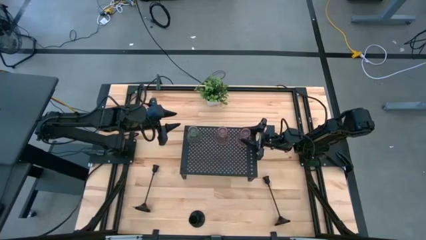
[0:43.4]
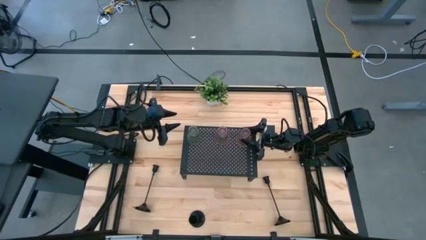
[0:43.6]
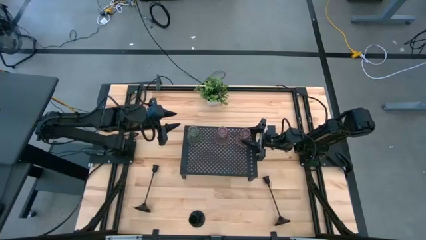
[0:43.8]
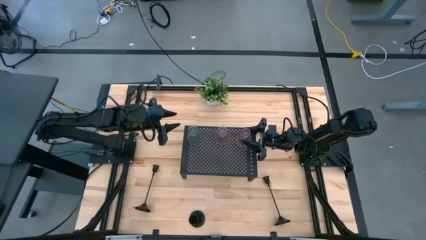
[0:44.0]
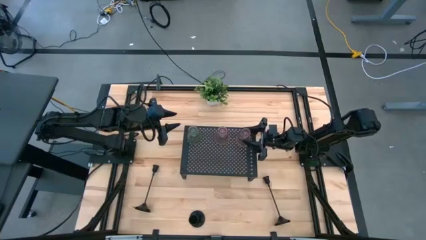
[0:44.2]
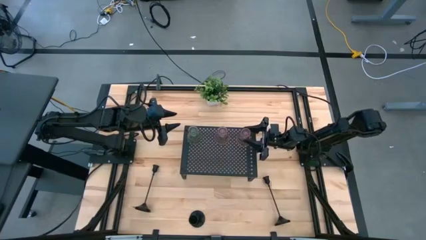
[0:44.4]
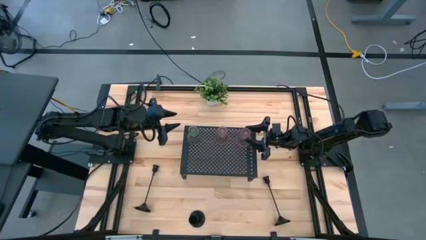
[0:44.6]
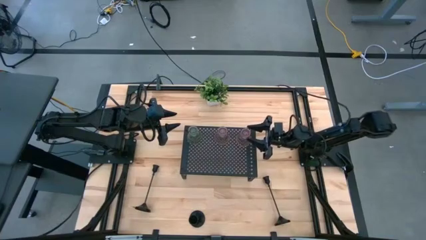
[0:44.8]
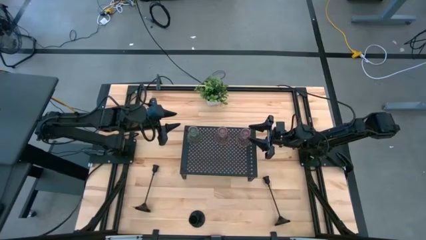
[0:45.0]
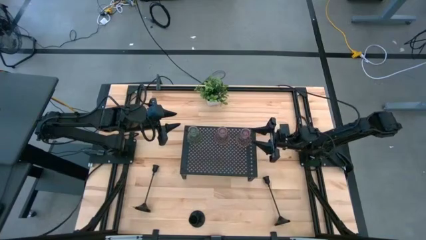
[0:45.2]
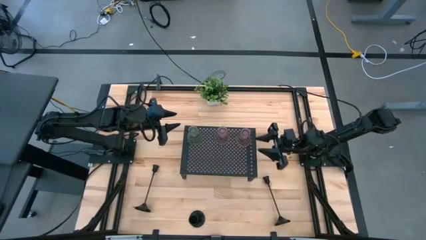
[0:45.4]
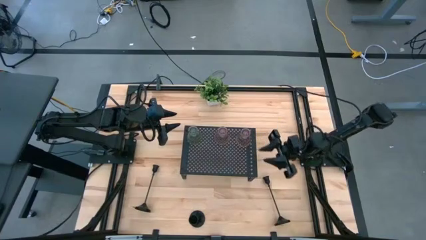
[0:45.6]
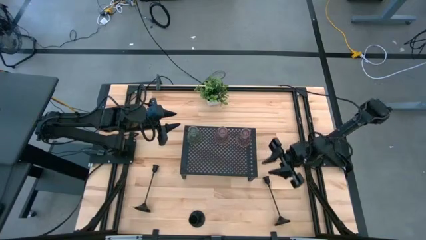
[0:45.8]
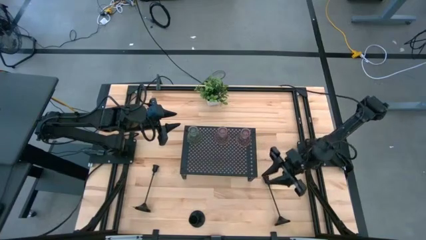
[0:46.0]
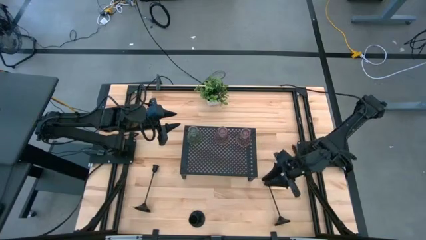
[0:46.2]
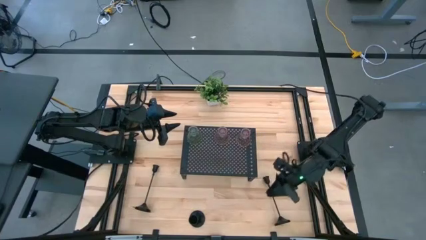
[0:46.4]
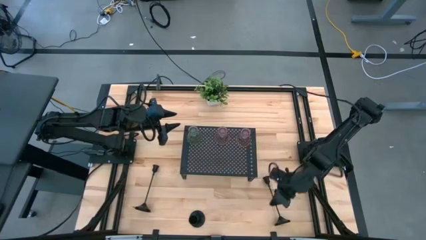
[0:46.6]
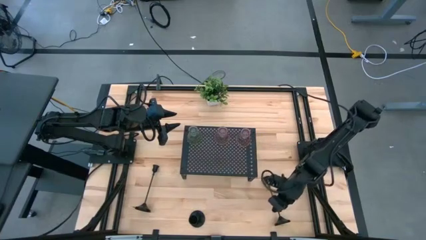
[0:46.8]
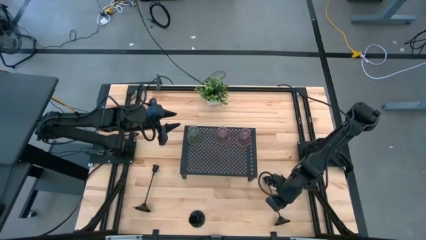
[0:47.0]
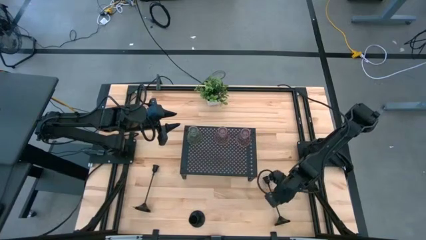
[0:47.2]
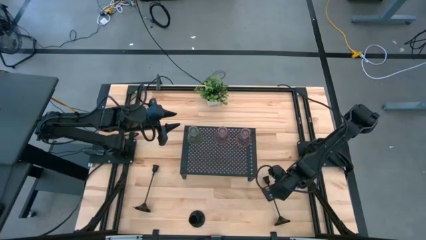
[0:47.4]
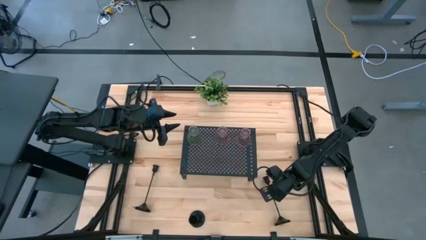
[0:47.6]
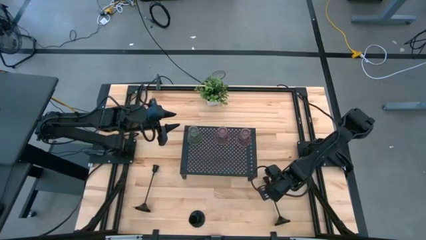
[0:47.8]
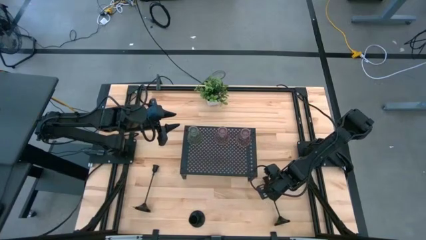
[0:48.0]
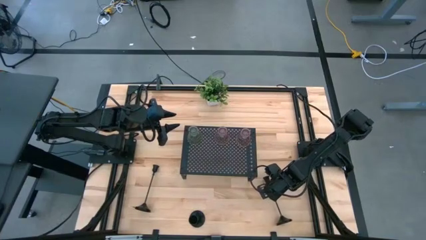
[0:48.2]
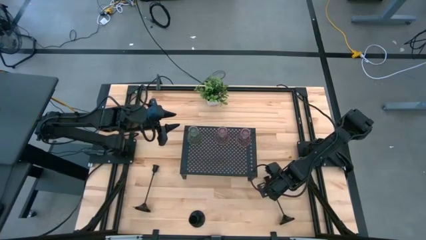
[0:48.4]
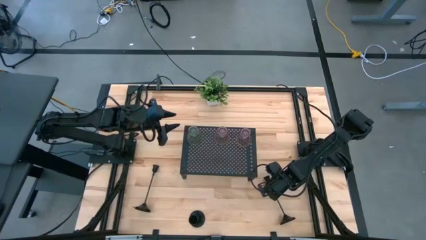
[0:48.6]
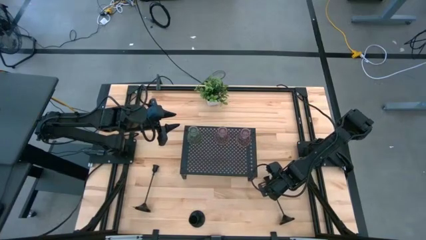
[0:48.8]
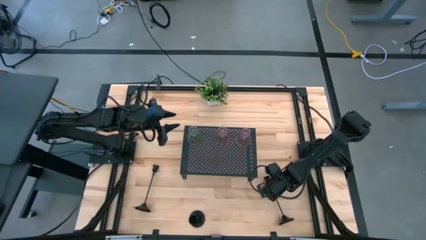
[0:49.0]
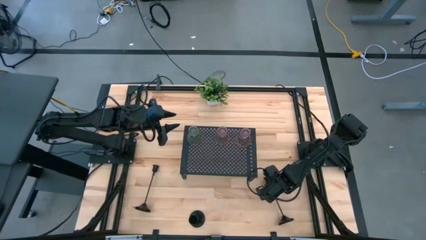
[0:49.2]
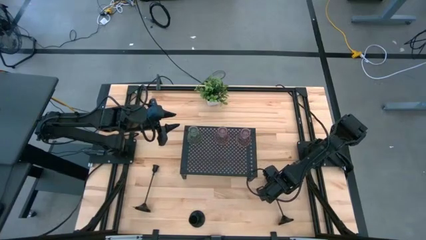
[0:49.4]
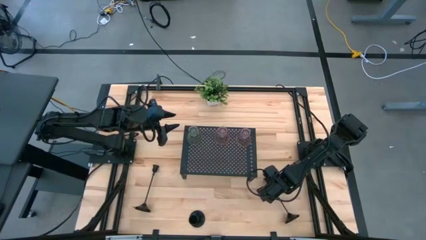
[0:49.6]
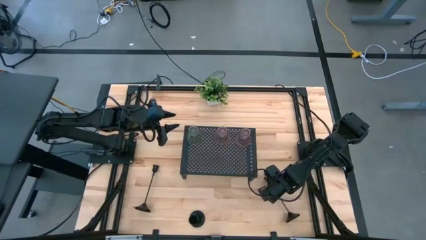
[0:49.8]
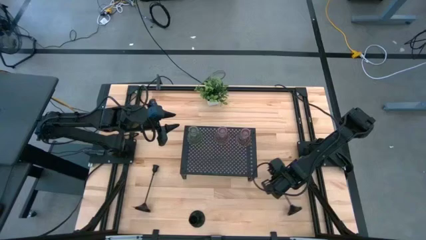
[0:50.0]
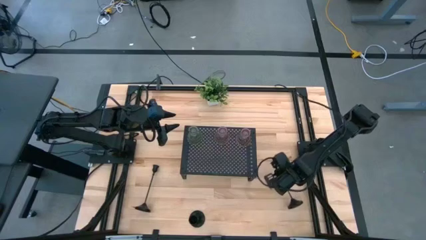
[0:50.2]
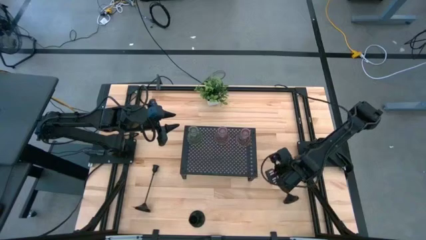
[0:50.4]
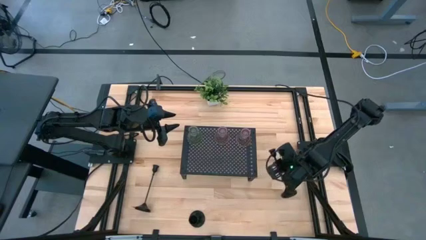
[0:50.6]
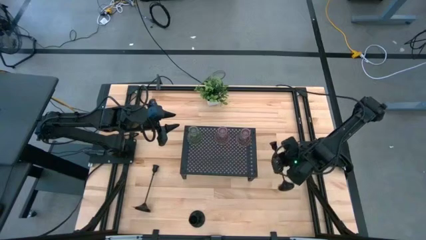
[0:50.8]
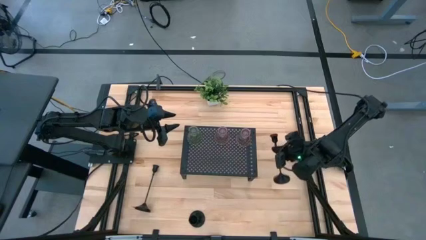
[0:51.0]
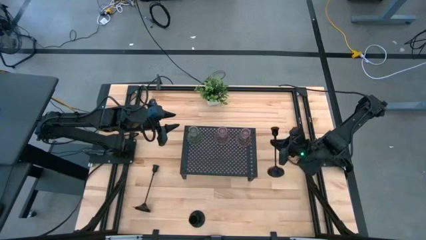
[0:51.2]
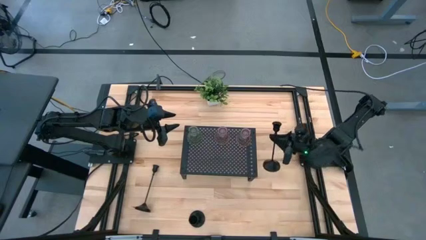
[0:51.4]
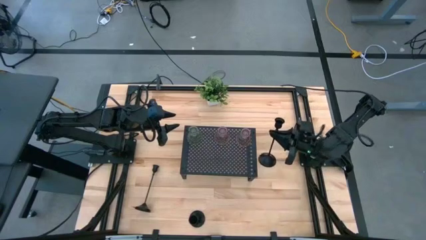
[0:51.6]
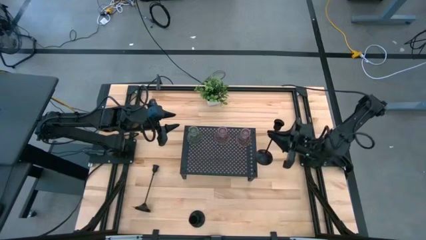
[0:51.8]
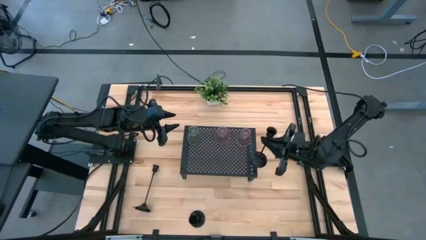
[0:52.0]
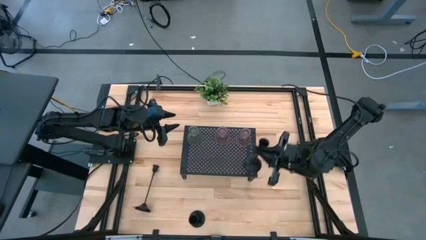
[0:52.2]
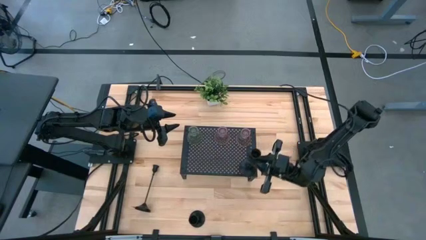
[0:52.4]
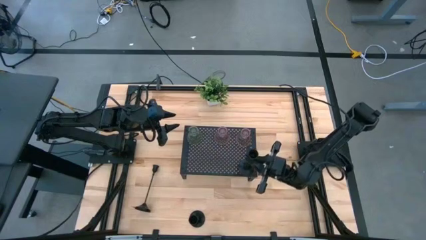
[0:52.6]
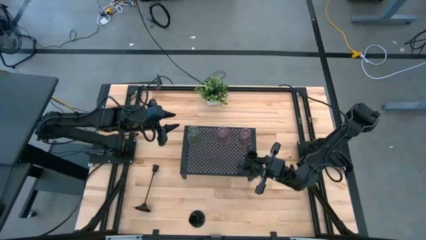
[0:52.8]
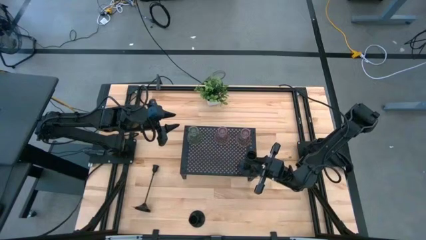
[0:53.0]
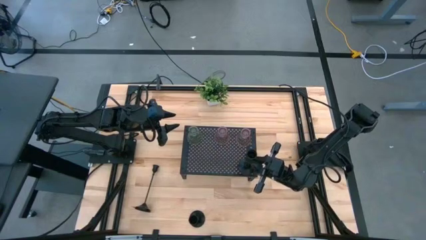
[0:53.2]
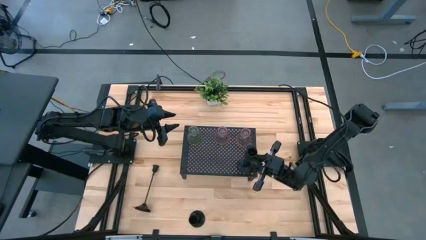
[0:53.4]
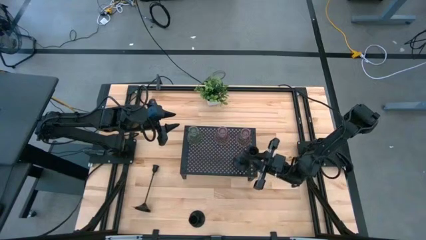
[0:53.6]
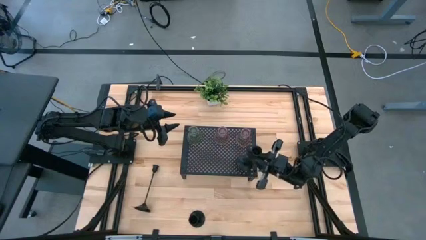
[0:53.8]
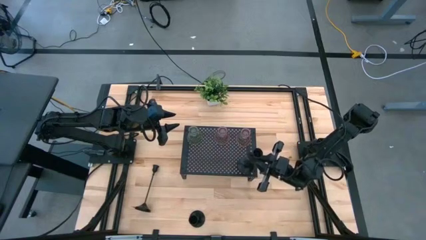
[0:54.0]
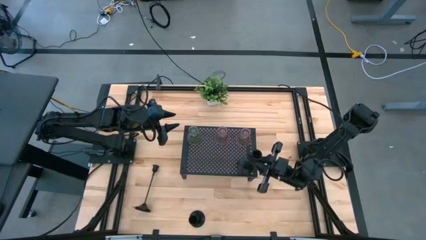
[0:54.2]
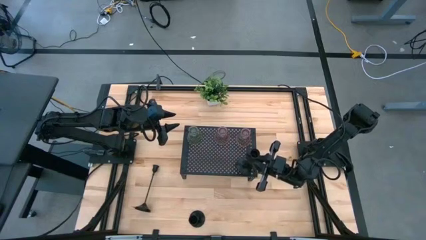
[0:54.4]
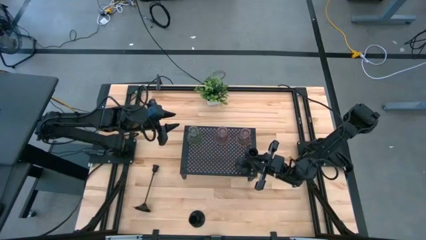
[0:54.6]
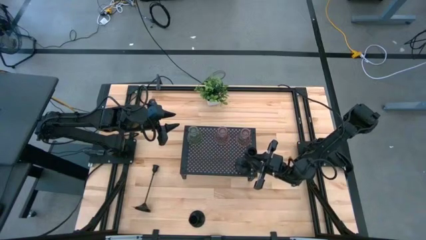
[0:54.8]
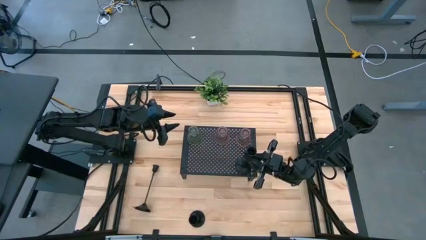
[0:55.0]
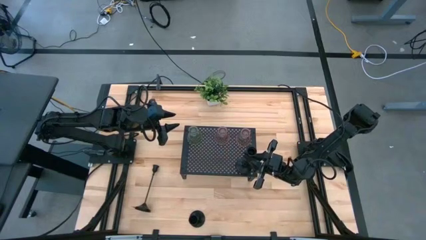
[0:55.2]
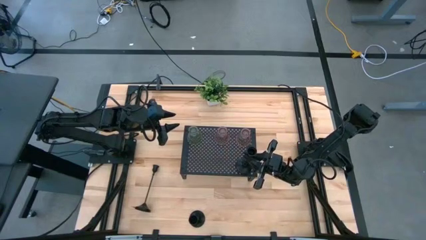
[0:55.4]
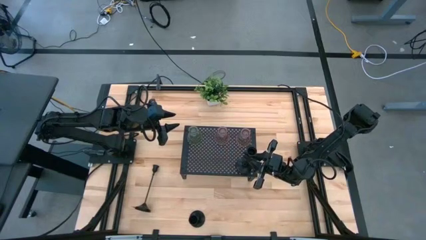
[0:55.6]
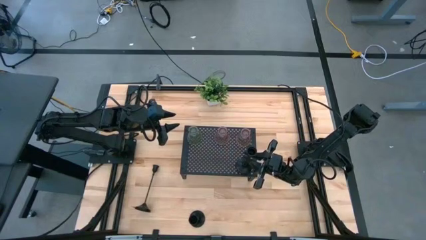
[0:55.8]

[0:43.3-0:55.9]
Task: Pick & Place candle stick holders
Put the right black candle holder on the shelf

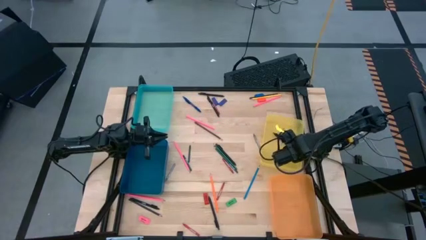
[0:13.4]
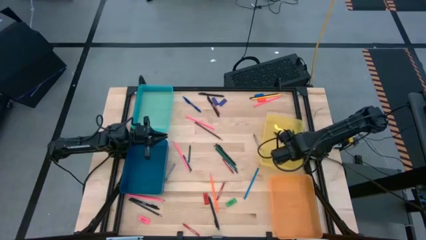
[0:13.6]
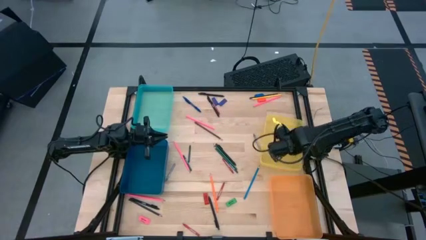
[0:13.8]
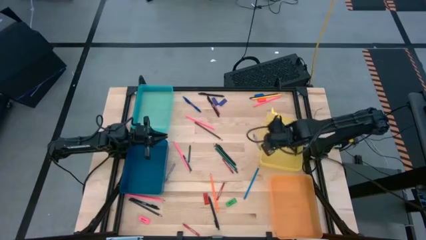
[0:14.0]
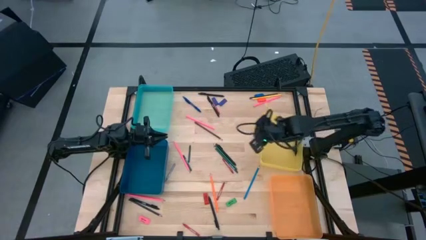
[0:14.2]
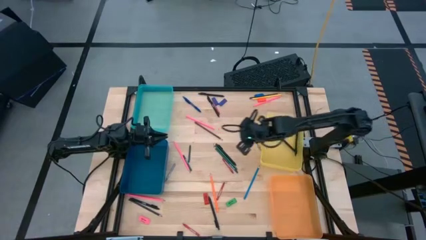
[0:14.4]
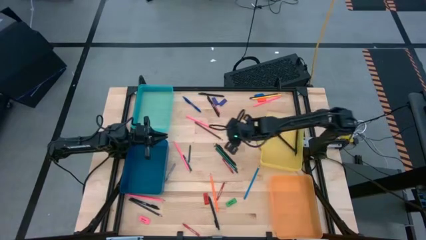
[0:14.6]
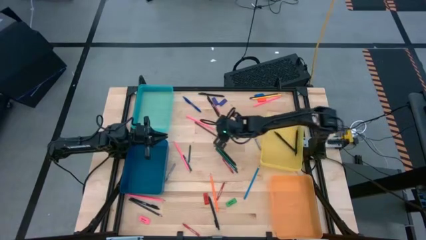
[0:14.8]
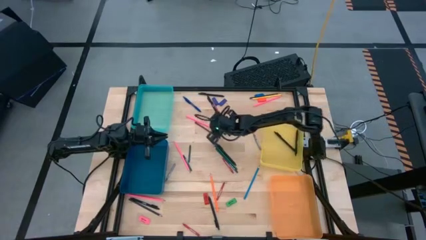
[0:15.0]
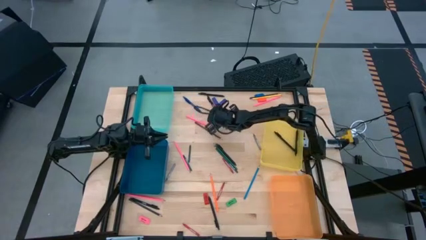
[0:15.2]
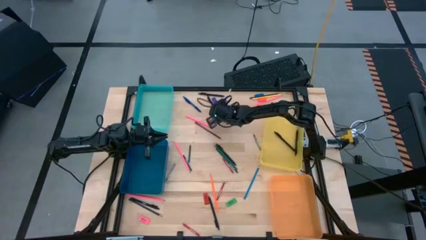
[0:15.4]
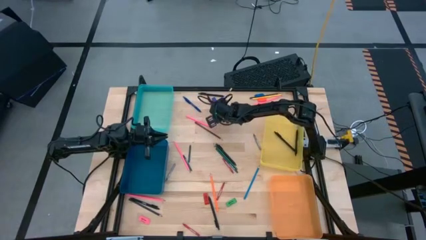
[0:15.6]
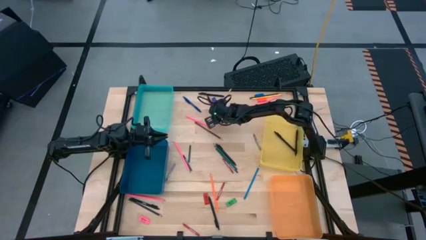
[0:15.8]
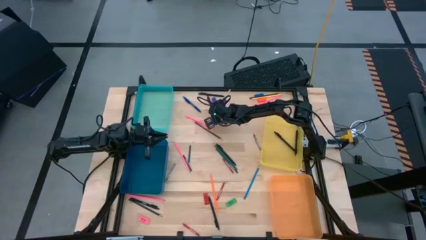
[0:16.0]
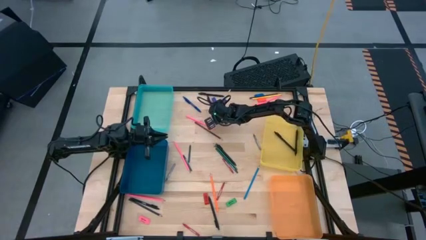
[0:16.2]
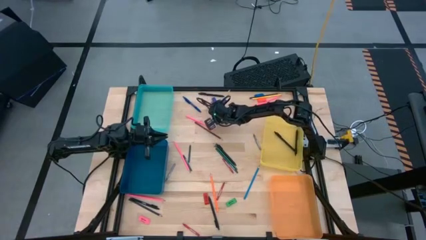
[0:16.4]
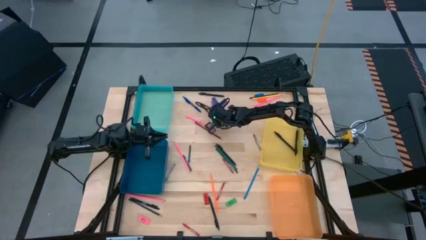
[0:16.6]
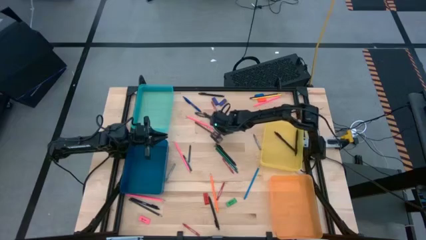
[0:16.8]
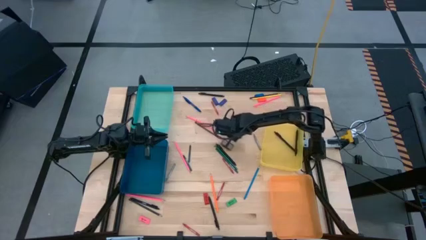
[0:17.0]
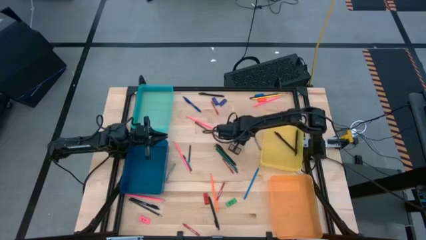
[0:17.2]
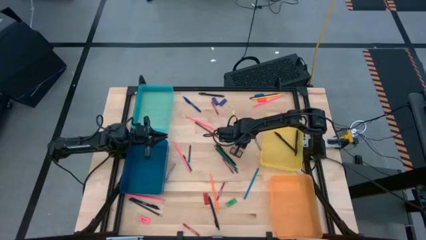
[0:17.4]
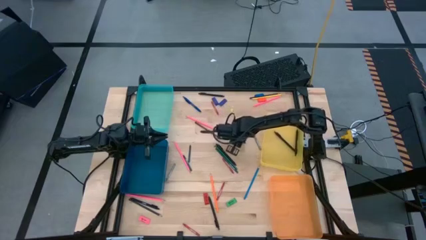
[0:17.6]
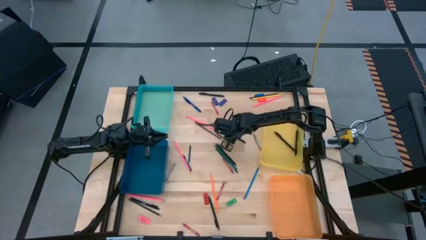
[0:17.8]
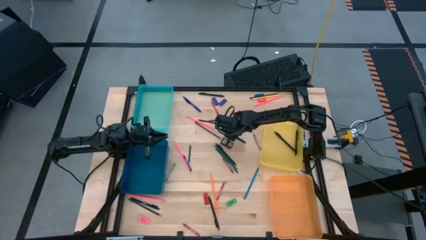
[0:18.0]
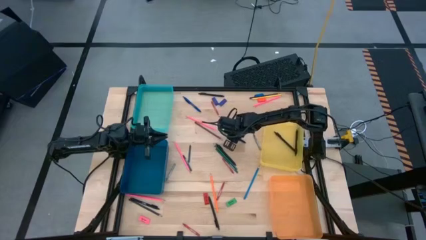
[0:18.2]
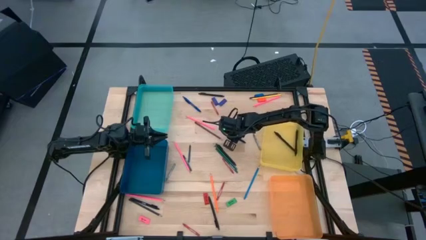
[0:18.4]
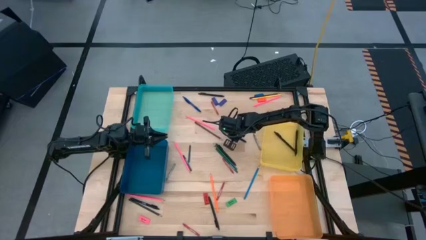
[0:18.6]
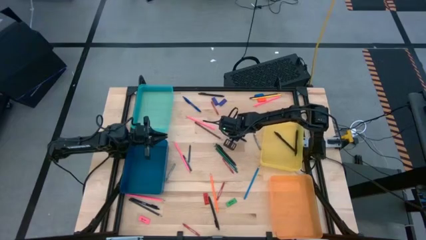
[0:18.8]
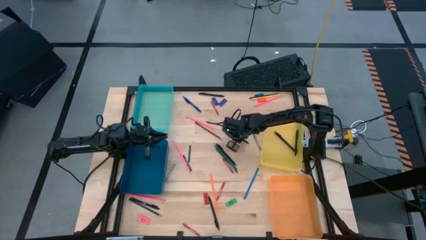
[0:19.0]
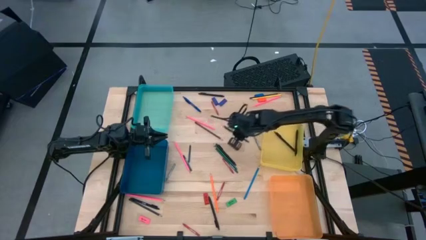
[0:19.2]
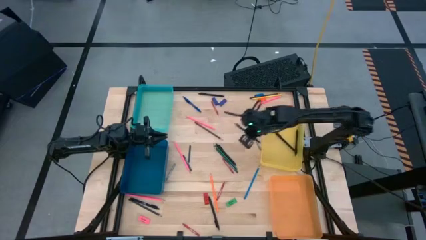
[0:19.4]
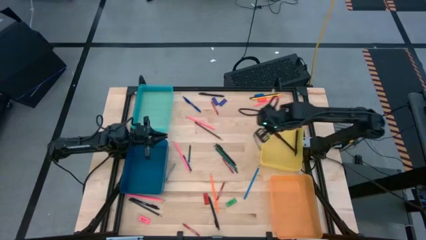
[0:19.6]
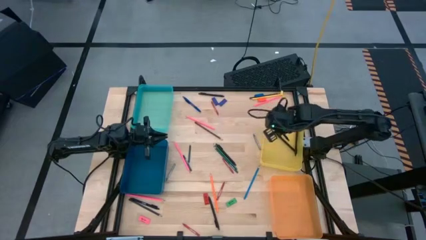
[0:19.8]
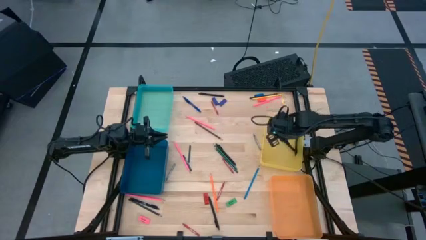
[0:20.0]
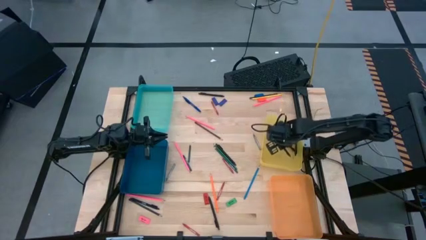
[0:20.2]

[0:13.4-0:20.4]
Task: Sort crayons/erasers/pens/pencils in bins
Put the black pen into the yellow bin
